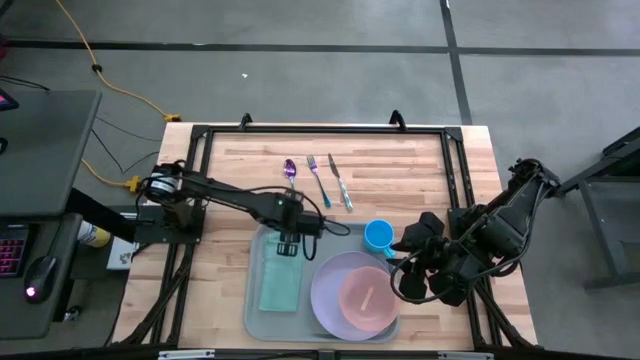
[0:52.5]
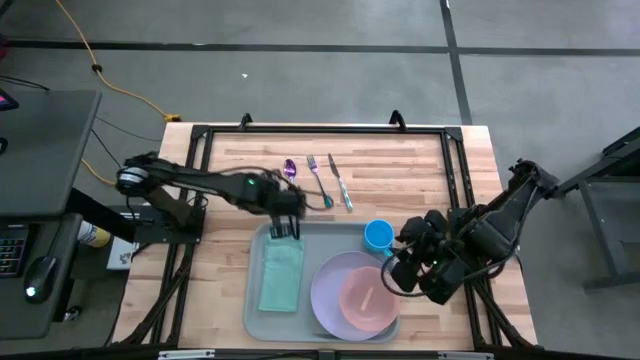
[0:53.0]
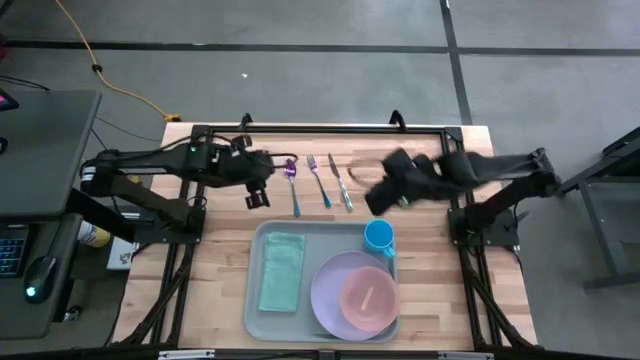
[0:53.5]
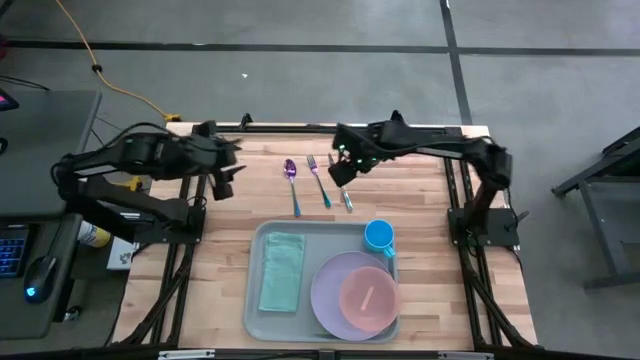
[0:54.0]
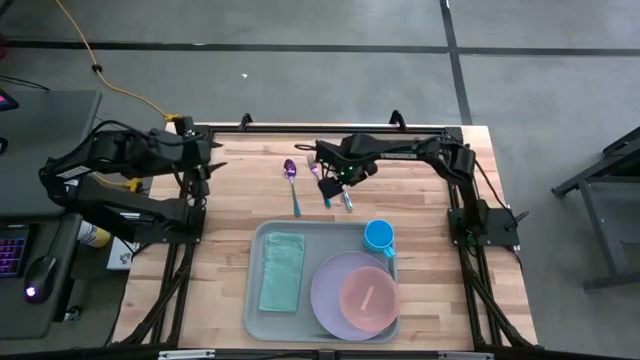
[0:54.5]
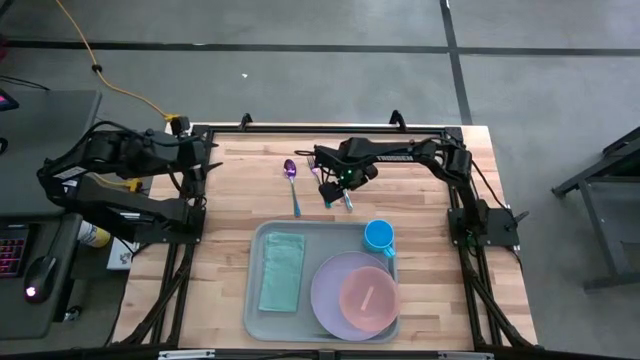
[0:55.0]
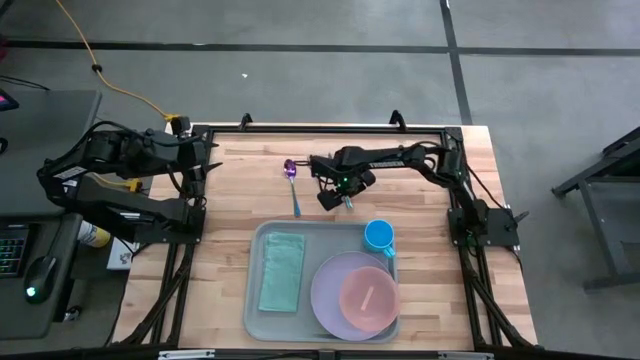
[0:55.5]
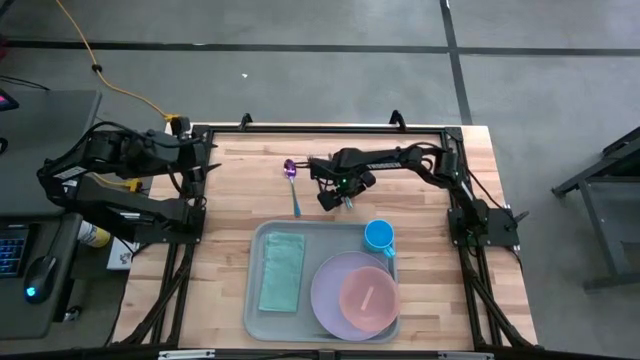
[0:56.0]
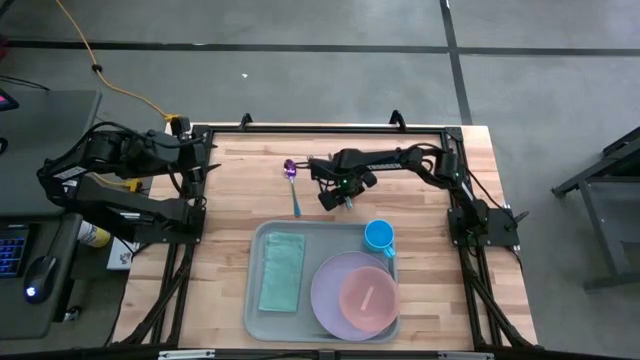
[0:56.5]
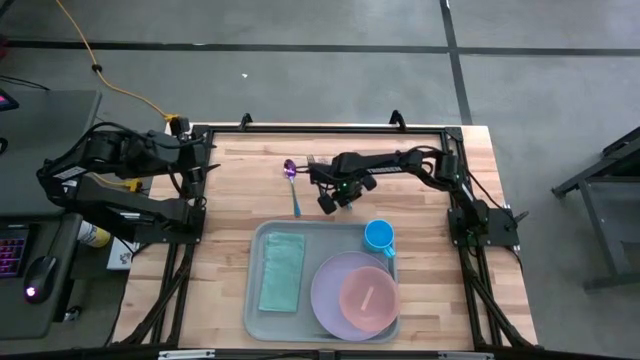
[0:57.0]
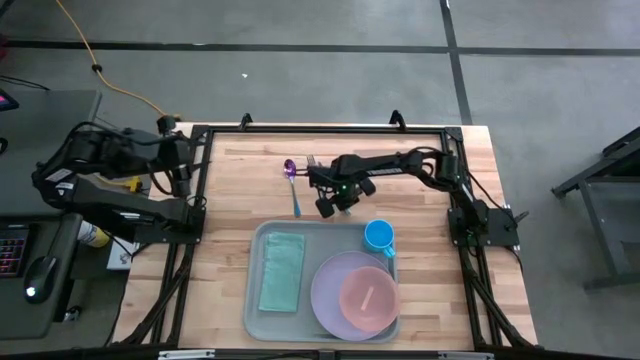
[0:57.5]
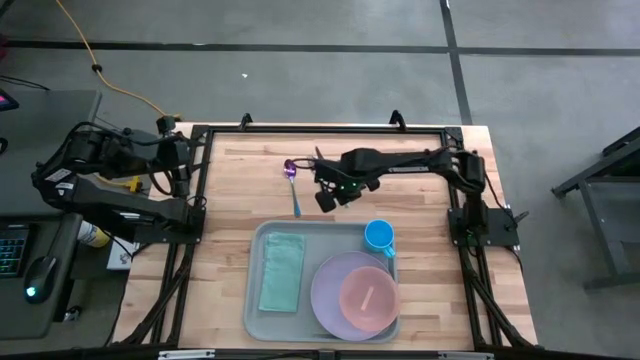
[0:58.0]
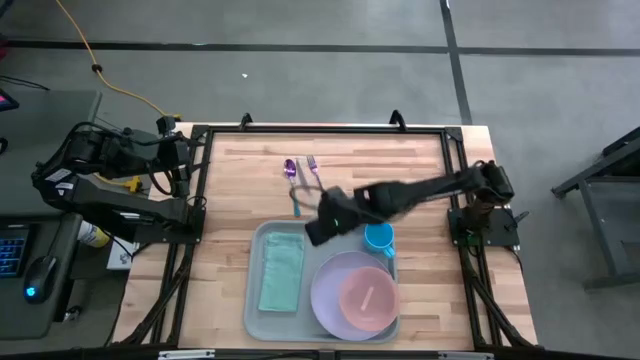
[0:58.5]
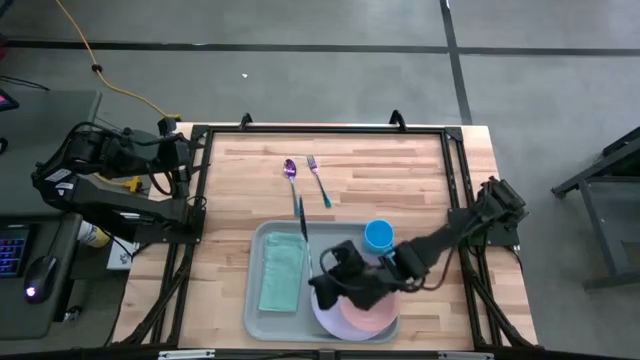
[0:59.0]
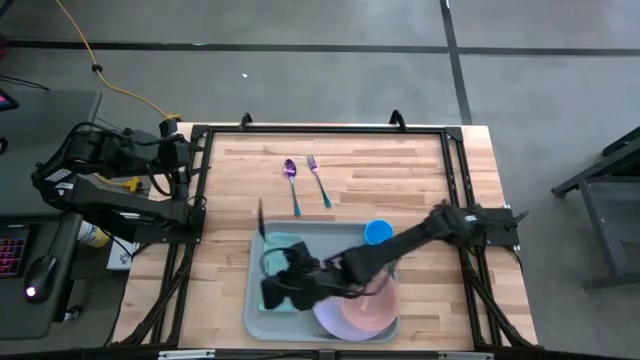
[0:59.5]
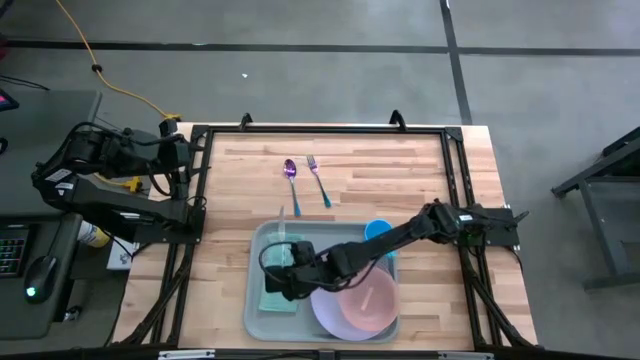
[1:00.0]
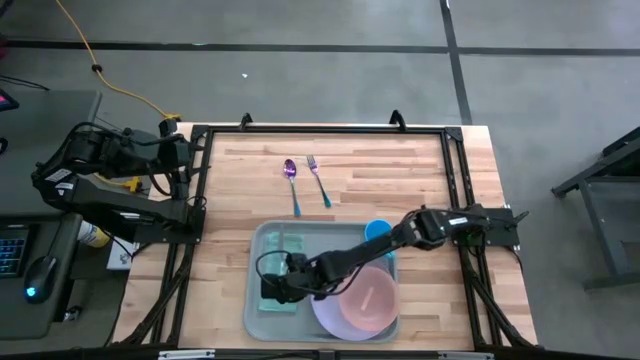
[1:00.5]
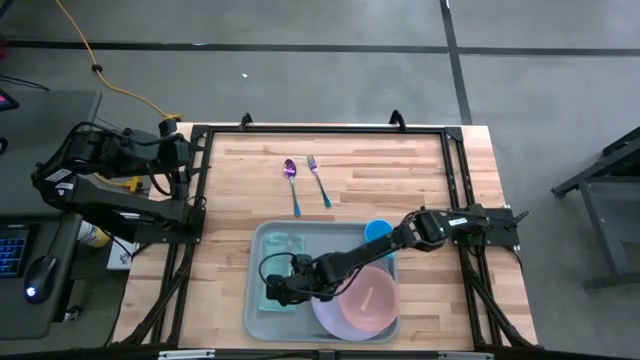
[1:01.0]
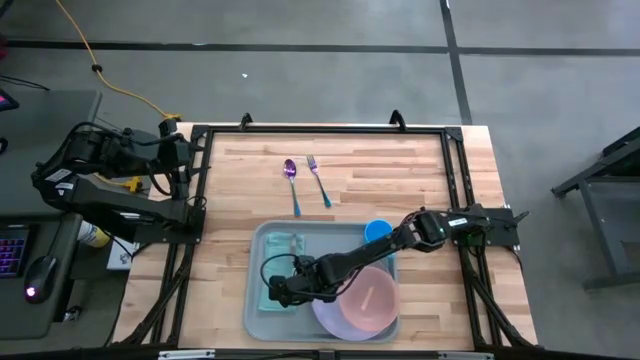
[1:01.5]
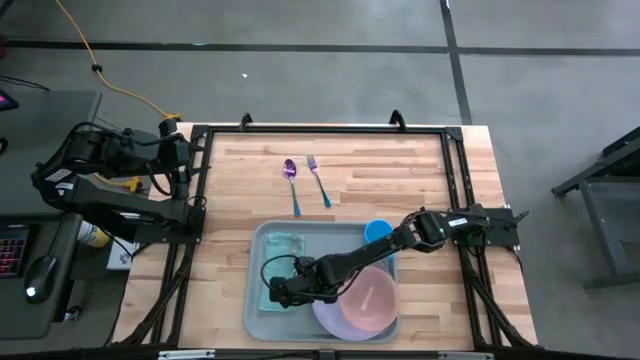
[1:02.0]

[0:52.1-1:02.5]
Task: Set up tray
Put the green table knife on the light green table napkin

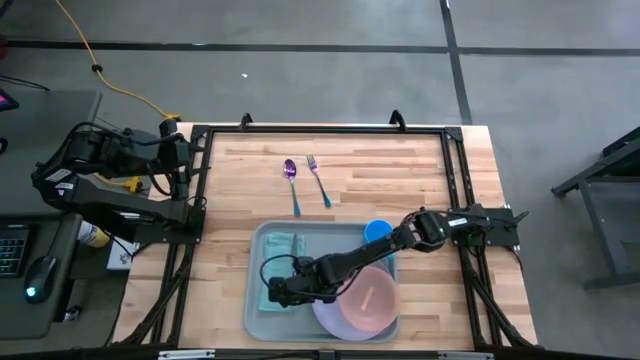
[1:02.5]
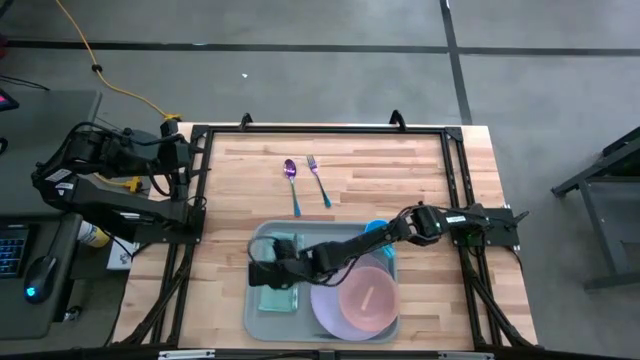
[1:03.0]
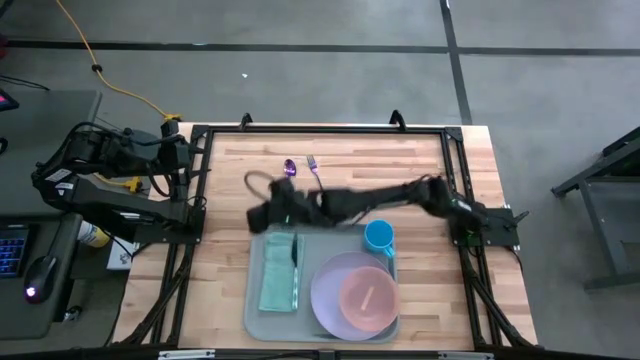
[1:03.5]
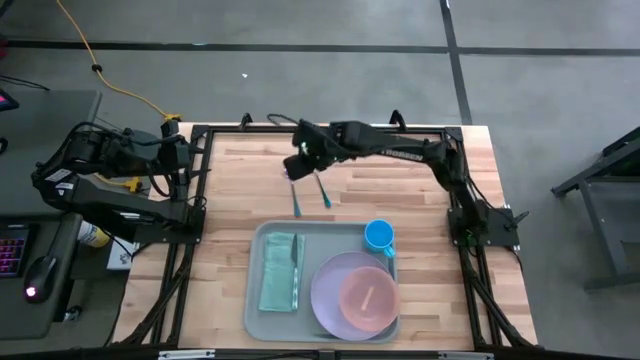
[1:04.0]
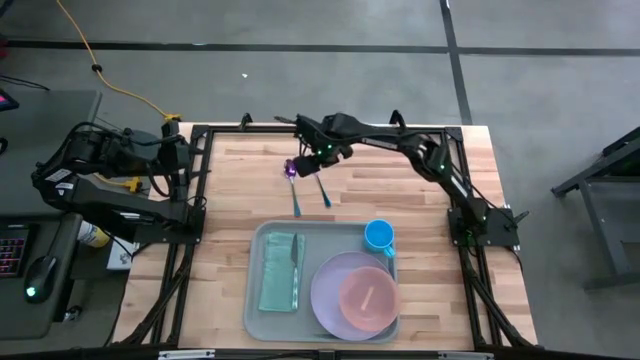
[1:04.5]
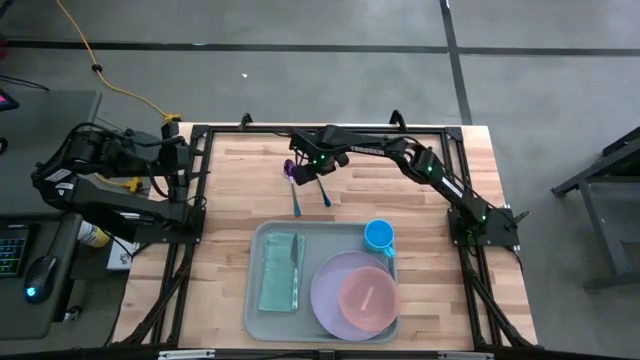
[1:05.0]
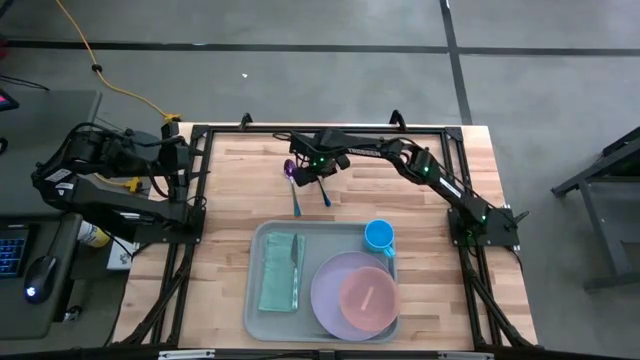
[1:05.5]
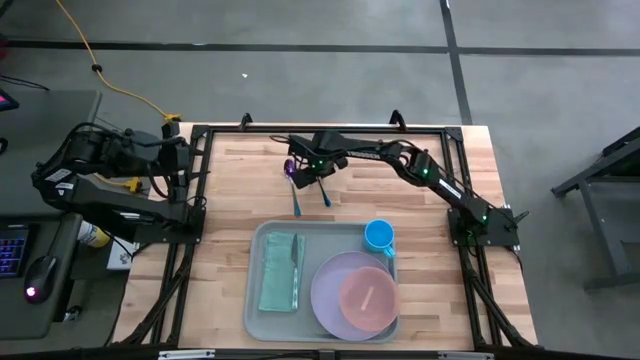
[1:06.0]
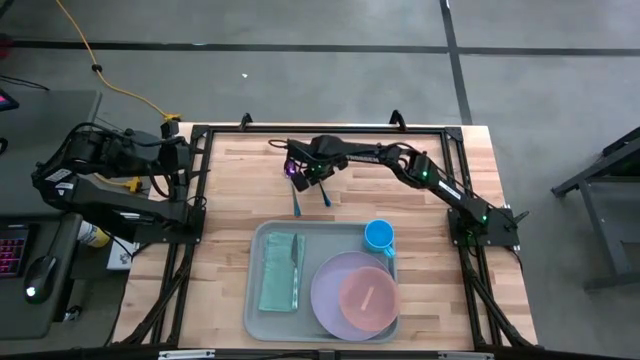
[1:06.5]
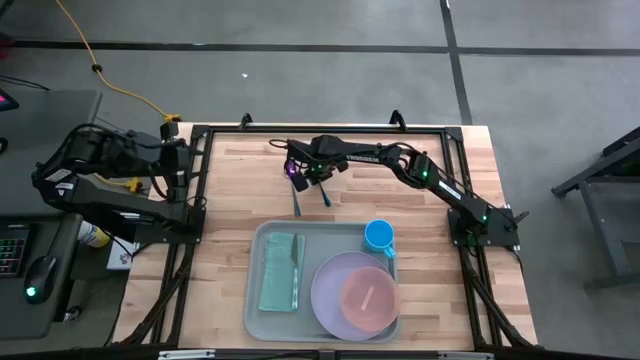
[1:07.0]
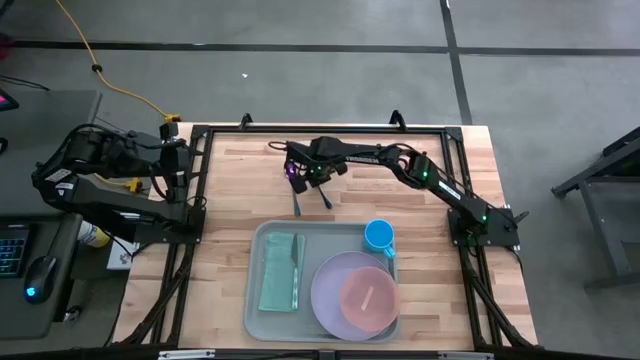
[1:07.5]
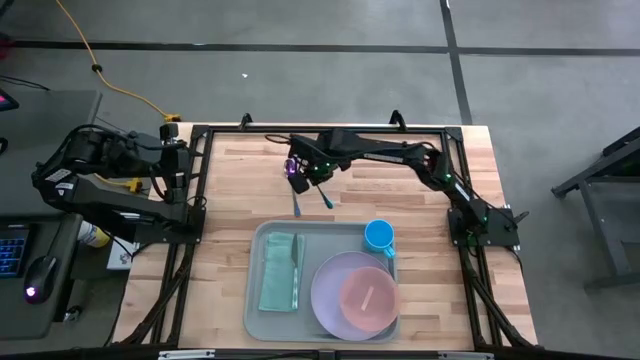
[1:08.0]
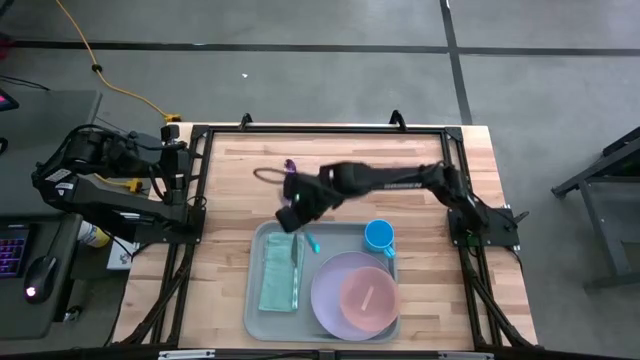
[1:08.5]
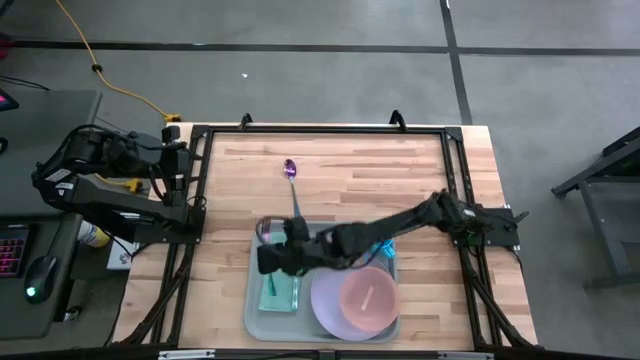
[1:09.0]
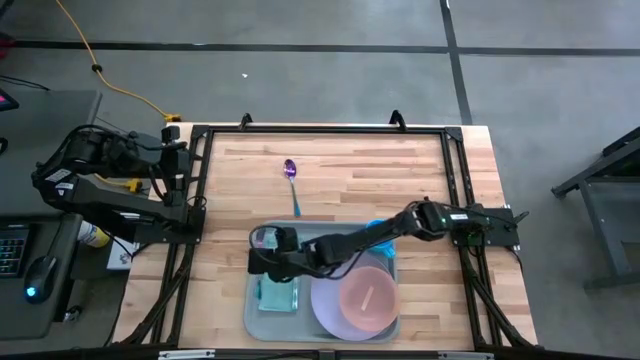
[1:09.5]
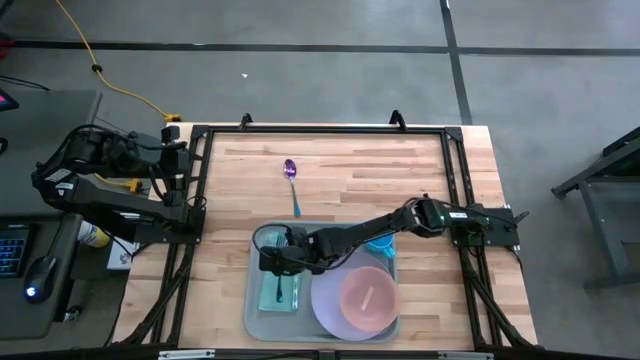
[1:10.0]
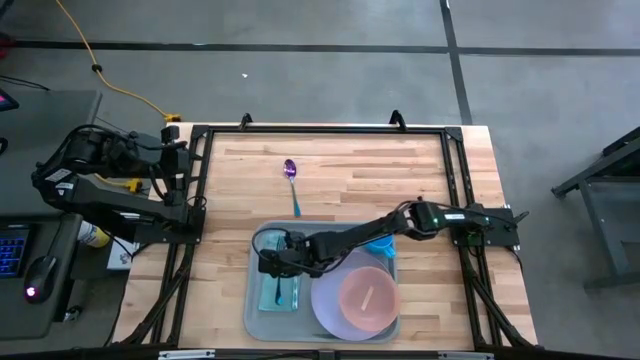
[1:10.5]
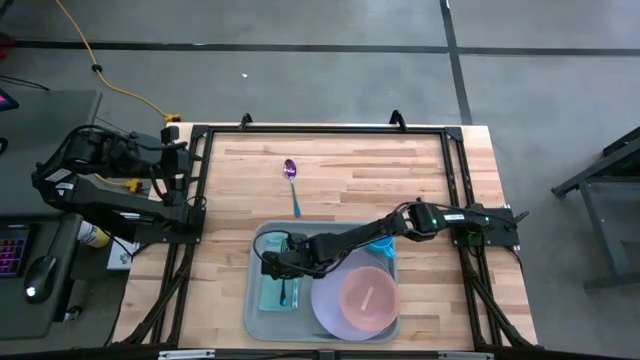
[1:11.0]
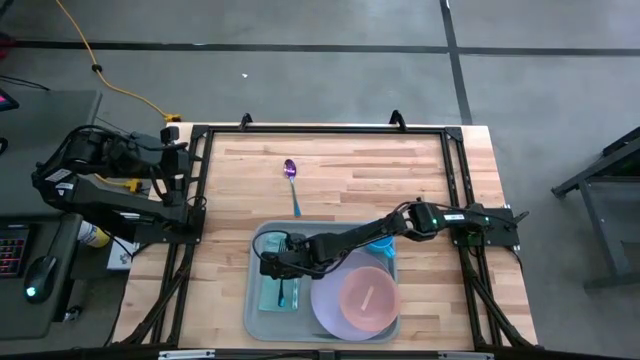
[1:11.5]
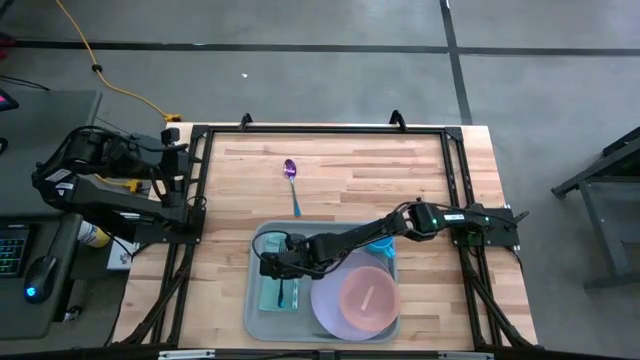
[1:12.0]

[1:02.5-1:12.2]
Put the violet fork on the light green table napkin to the left of the green table knife

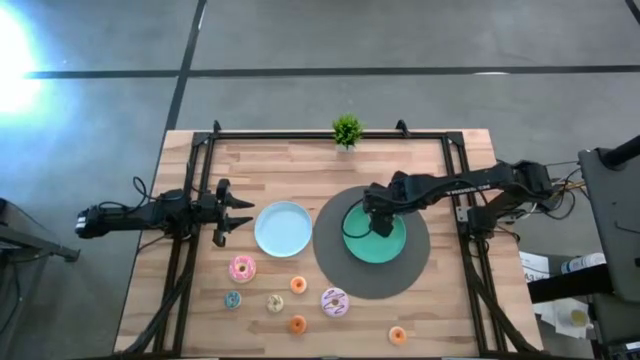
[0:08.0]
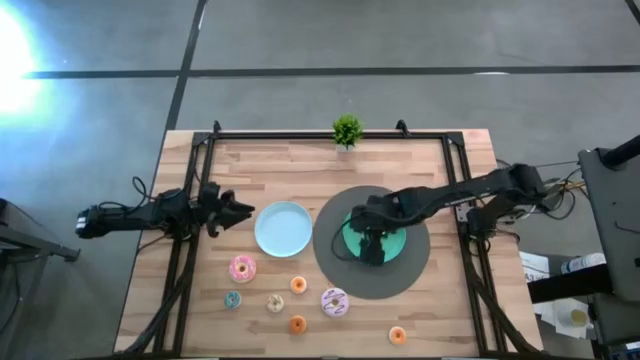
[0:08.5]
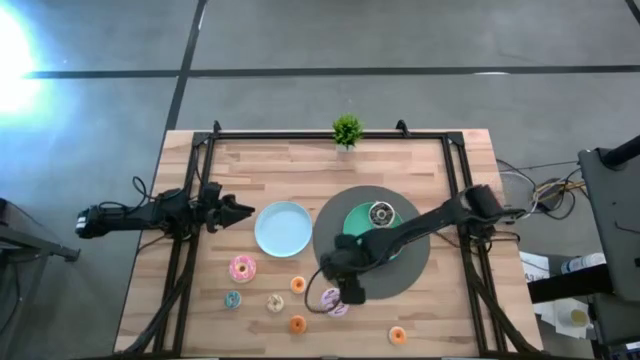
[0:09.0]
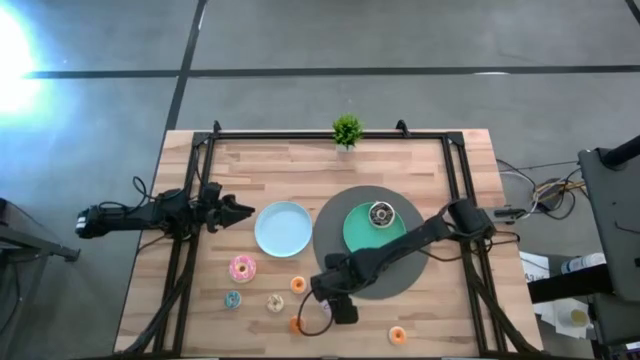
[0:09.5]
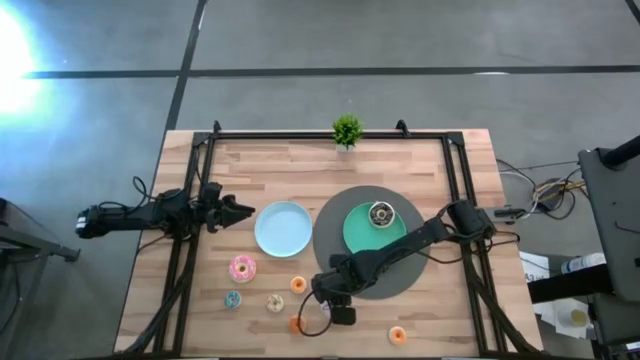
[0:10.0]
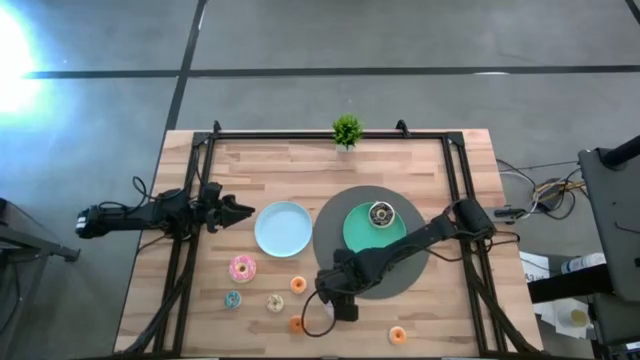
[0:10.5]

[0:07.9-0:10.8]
Task: Pick & Place donuts
Put the big light pink donut on the green plate
